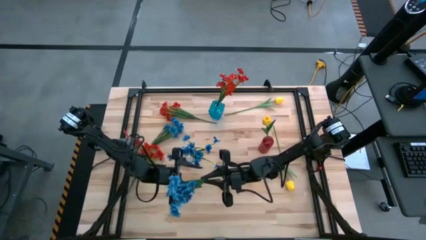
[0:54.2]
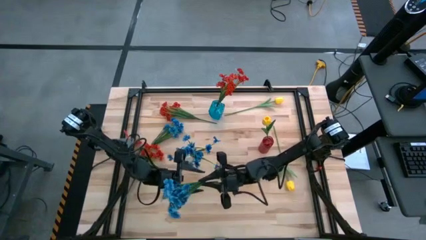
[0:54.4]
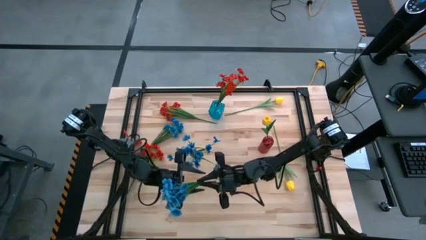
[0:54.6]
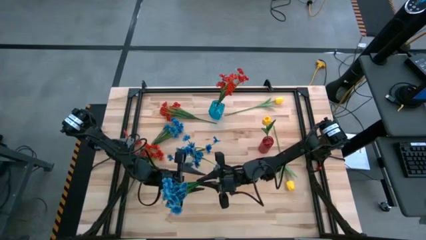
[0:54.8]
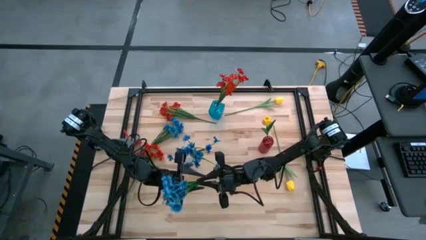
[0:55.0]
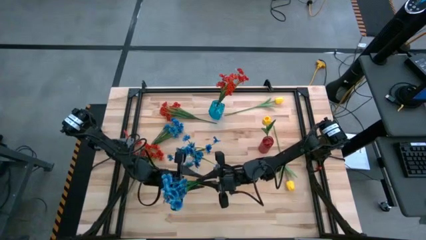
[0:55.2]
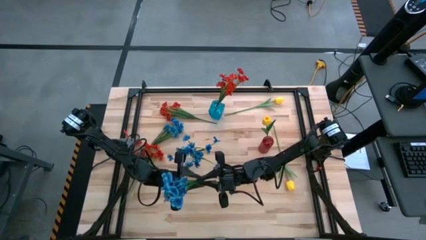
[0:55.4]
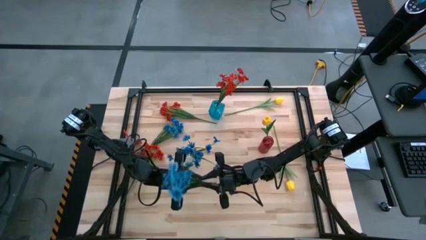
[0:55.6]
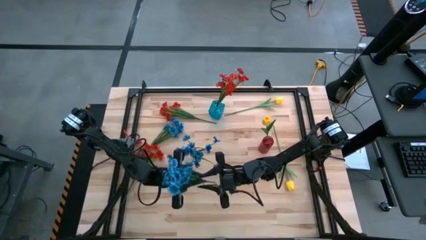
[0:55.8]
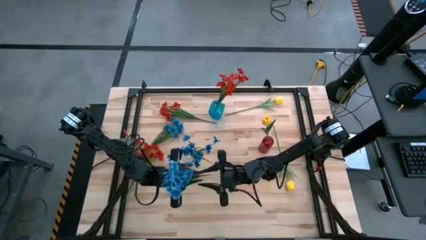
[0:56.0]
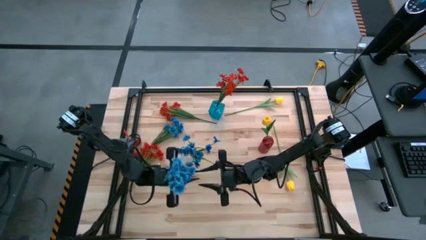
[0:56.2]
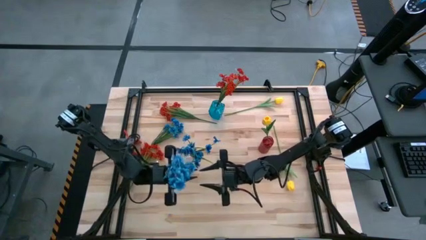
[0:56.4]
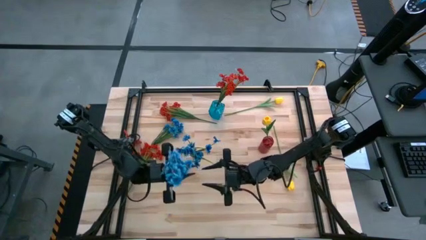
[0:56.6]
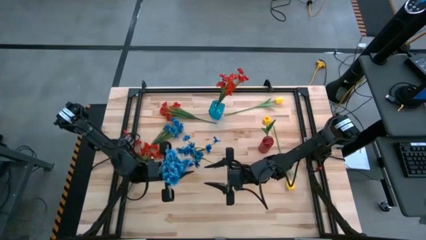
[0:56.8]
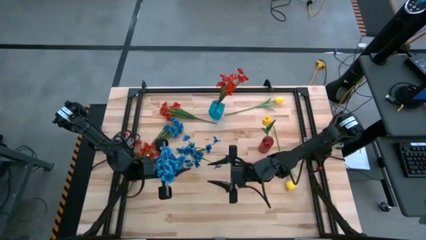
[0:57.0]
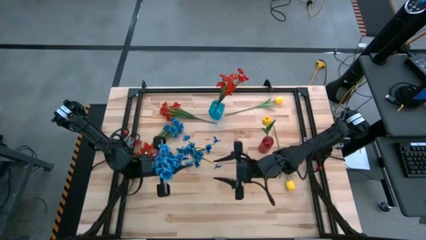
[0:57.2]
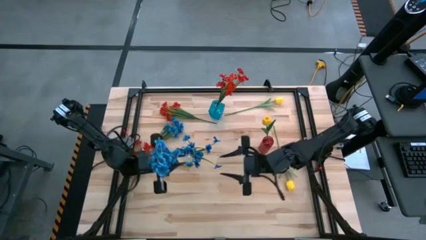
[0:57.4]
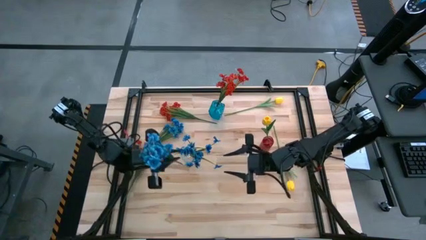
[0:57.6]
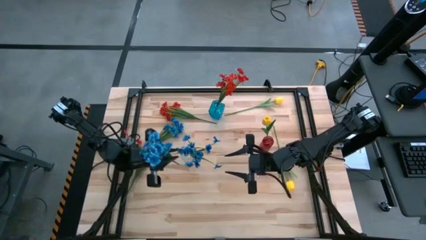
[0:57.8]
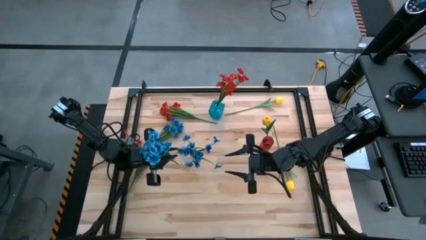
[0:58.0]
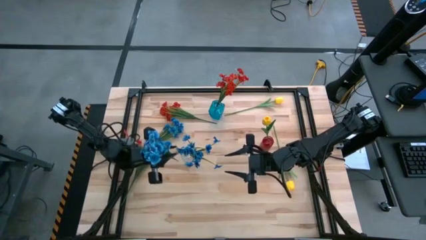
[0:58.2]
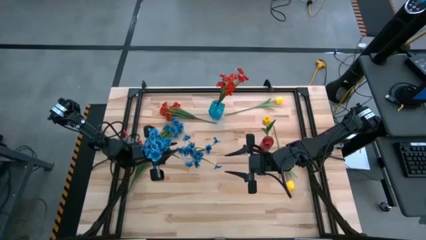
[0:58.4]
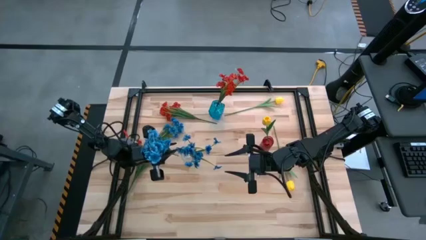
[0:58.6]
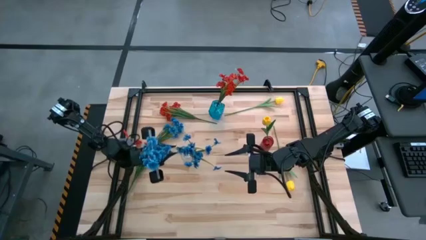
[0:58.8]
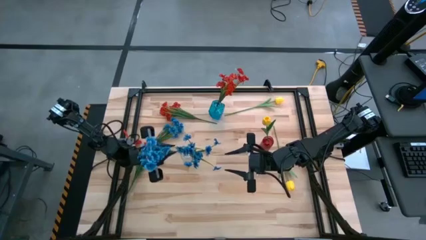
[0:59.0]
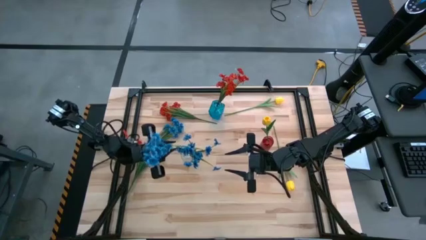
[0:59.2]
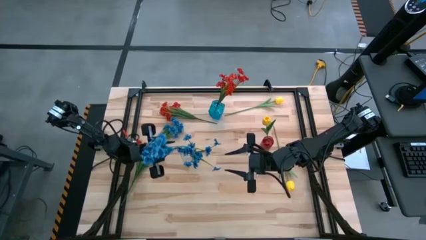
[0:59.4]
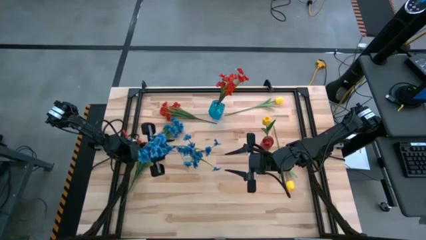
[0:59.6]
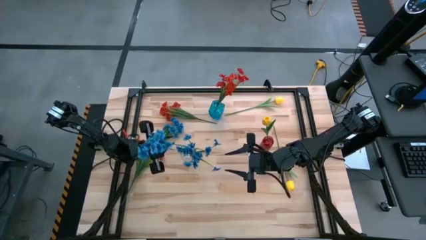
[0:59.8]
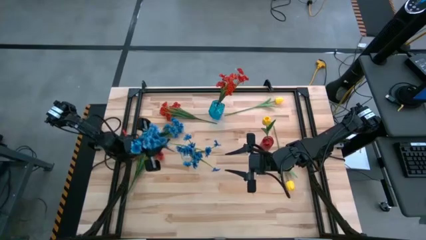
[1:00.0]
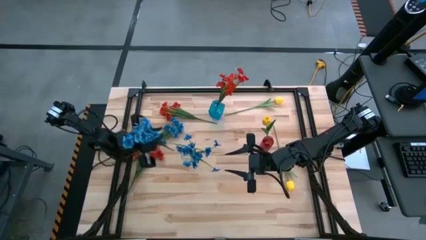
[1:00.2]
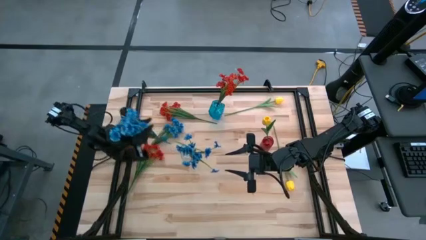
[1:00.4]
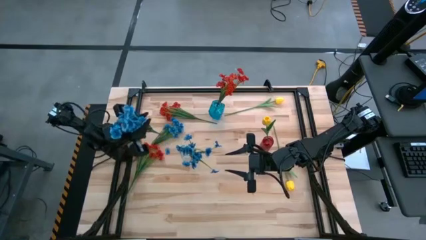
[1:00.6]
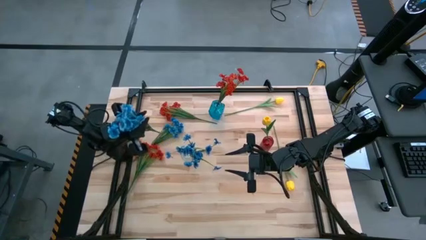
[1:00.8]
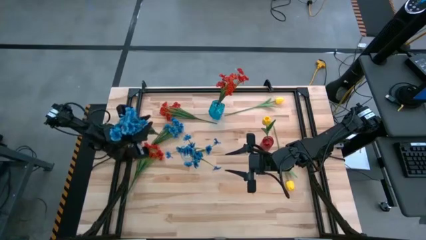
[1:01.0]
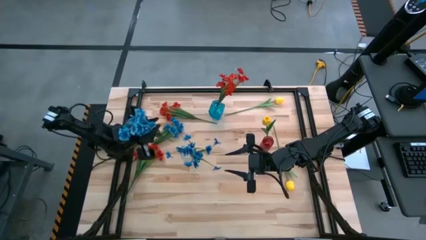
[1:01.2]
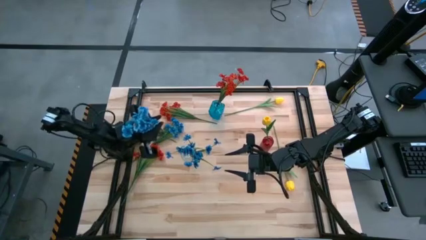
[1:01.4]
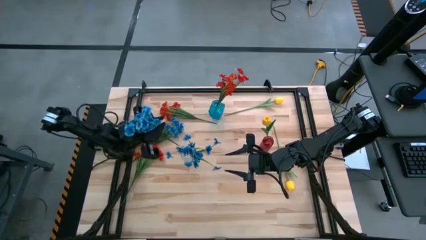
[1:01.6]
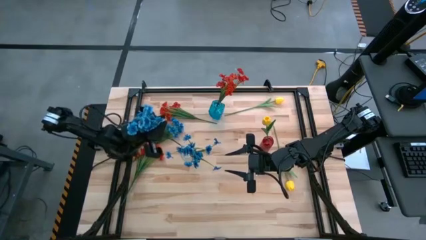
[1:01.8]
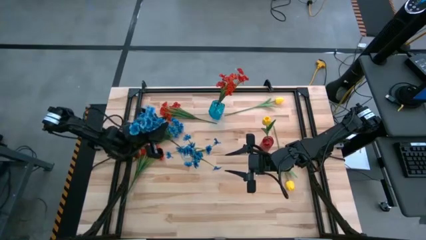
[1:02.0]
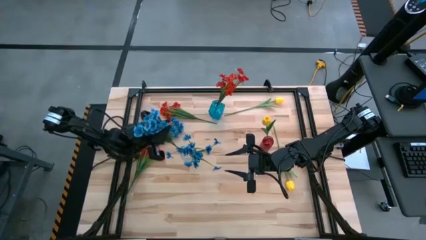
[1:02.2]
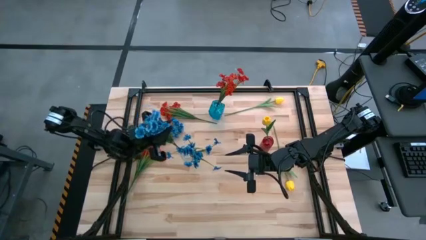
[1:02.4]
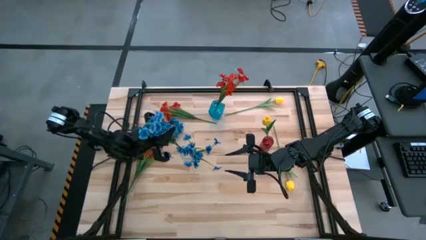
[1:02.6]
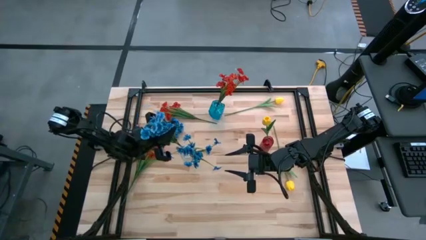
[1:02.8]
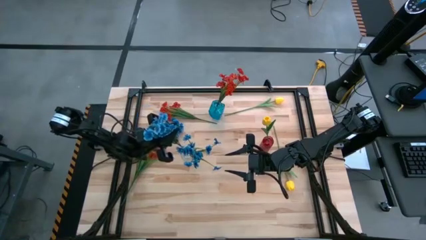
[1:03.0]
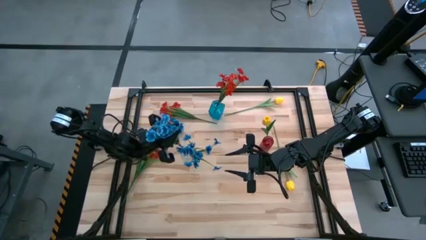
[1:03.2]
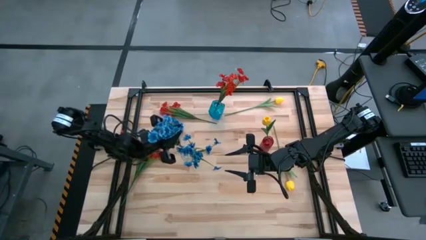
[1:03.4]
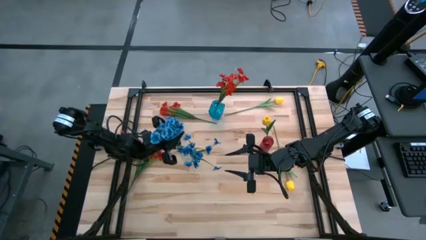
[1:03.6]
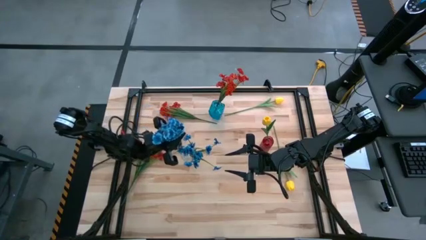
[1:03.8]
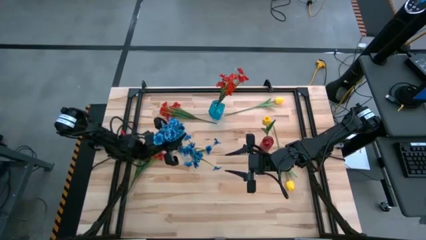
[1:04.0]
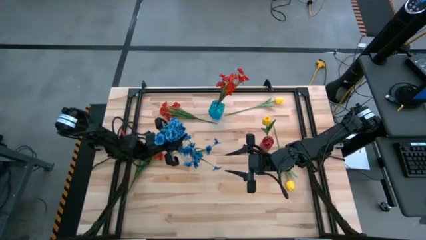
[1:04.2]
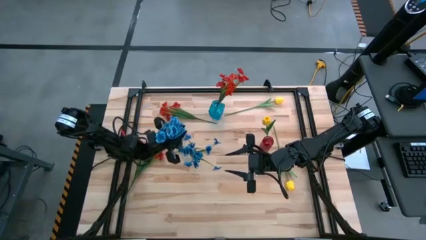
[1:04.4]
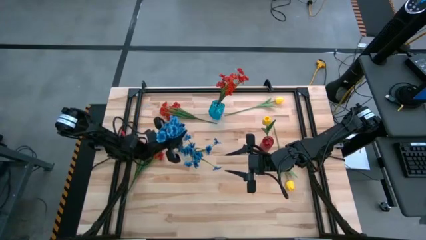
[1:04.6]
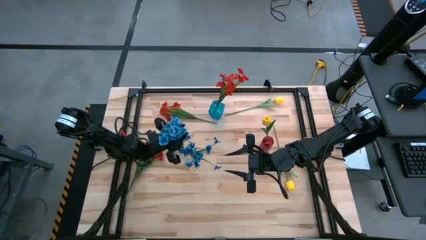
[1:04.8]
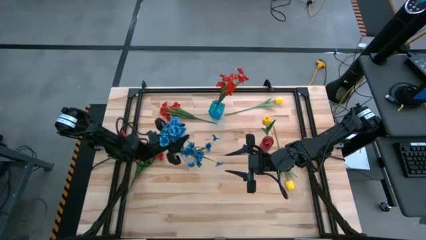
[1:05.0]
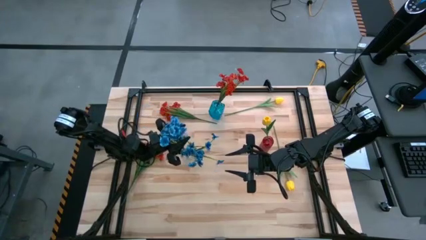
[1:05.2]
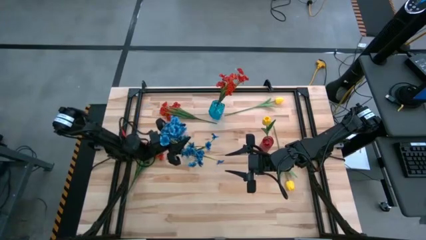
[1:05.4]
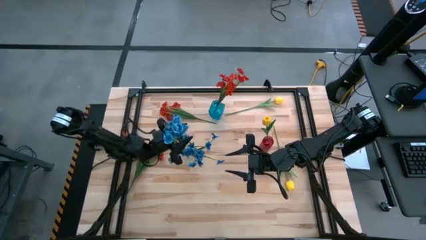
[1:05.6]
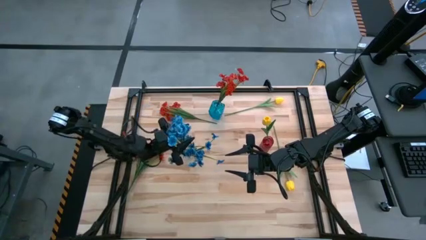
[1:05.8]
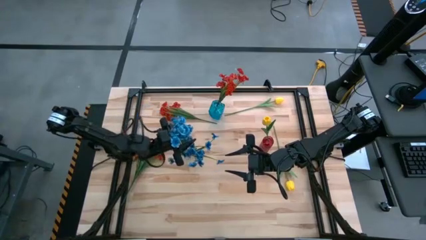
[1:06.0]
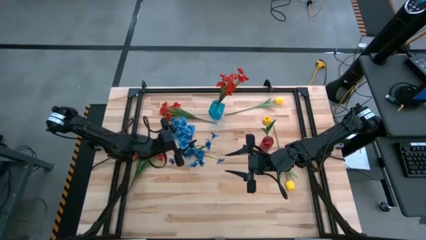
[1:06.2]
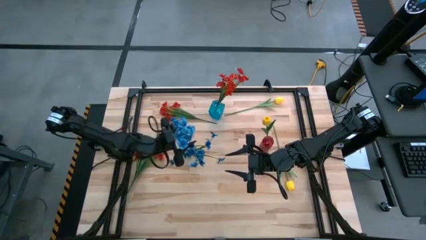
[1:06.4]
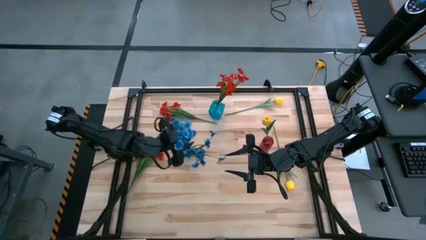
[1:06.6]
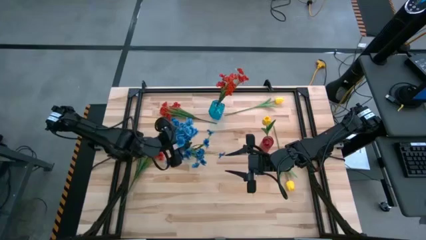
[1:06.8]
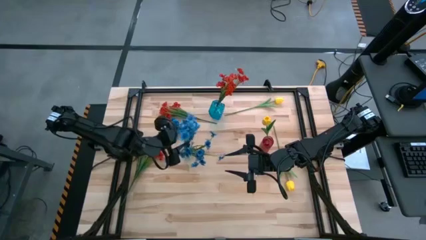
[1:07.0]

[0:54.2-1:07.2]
Task: Sort flowers into vase by color
Put the right blue flowers into the transparent vase
